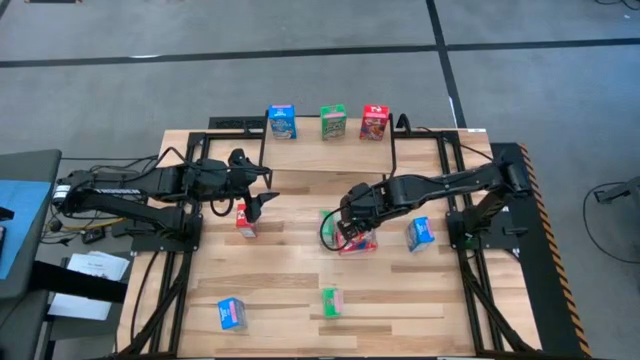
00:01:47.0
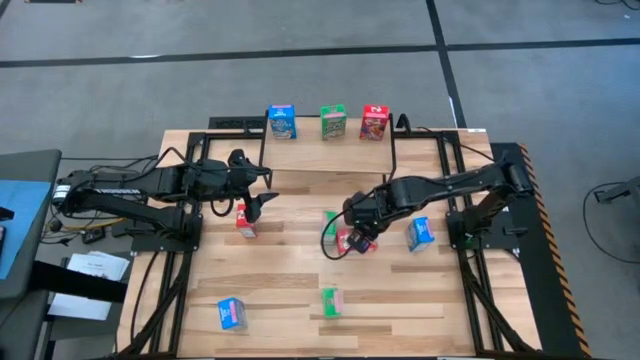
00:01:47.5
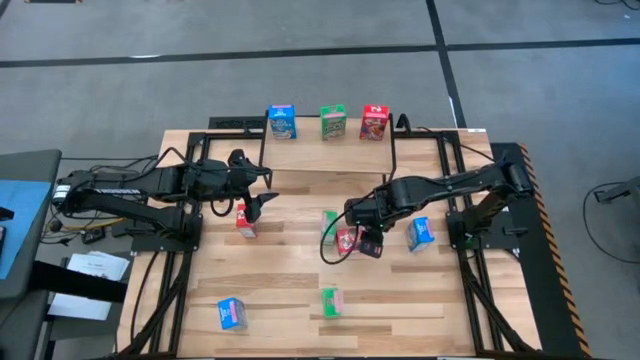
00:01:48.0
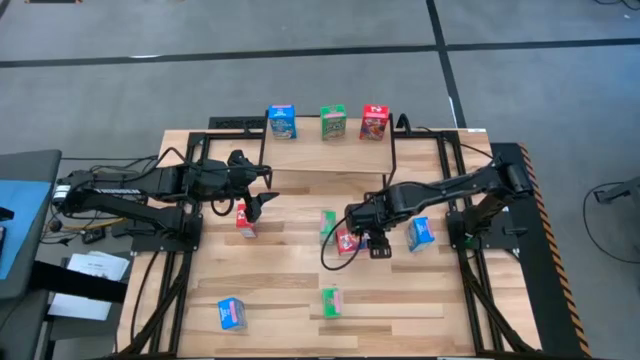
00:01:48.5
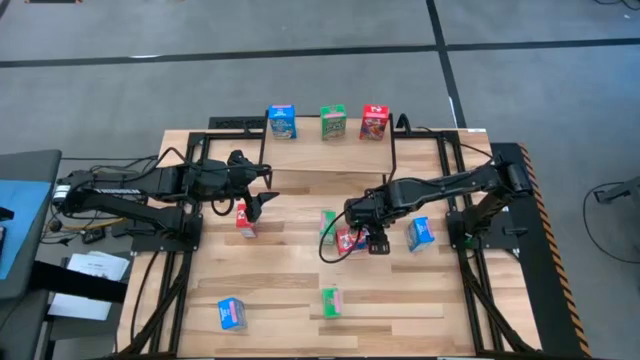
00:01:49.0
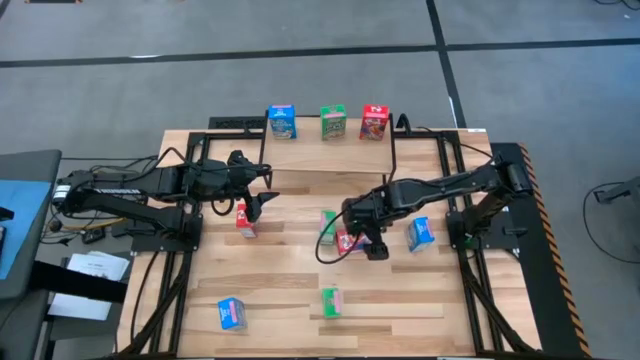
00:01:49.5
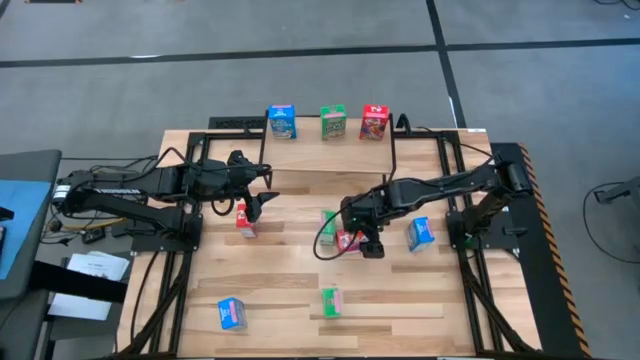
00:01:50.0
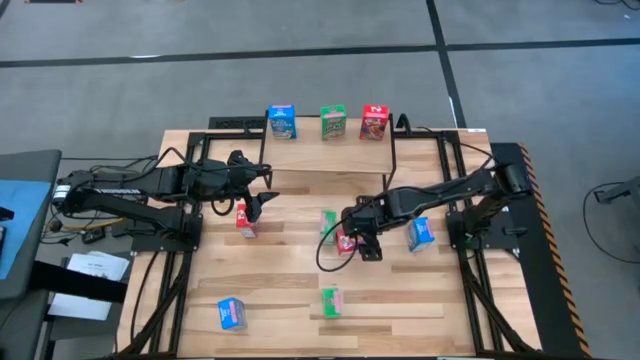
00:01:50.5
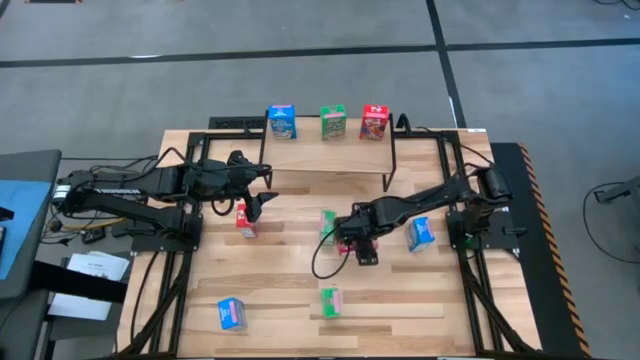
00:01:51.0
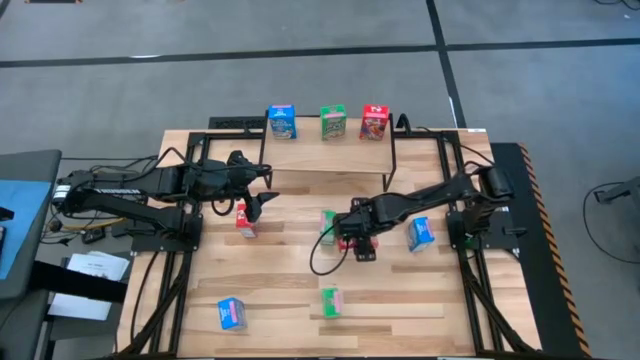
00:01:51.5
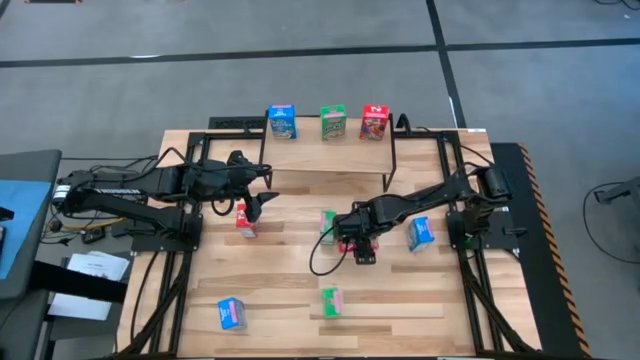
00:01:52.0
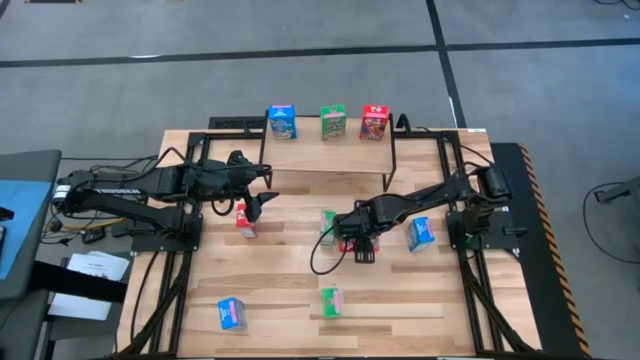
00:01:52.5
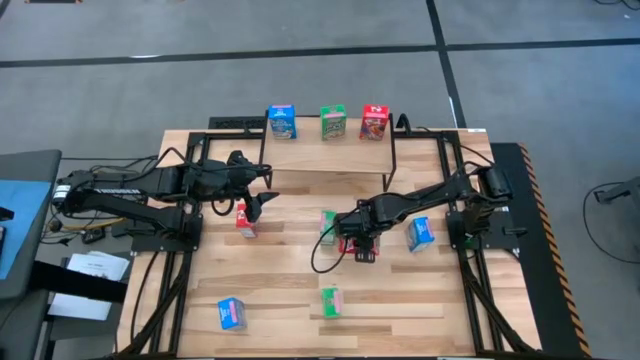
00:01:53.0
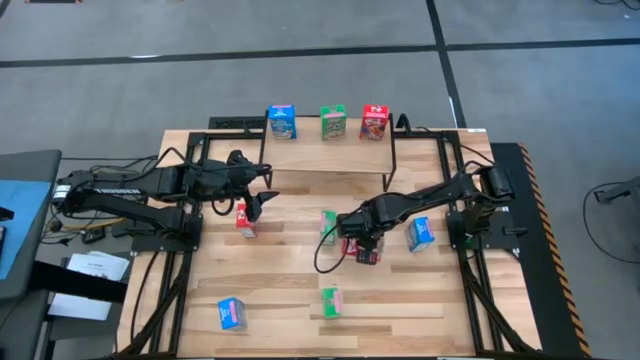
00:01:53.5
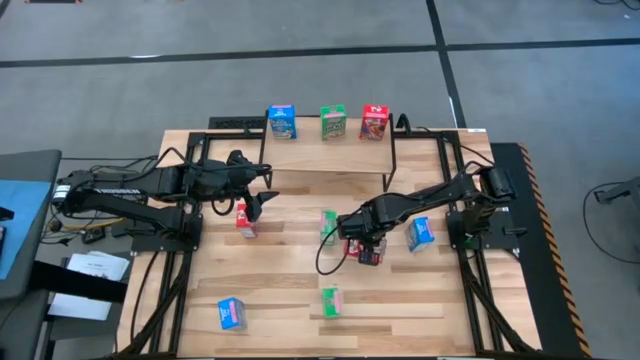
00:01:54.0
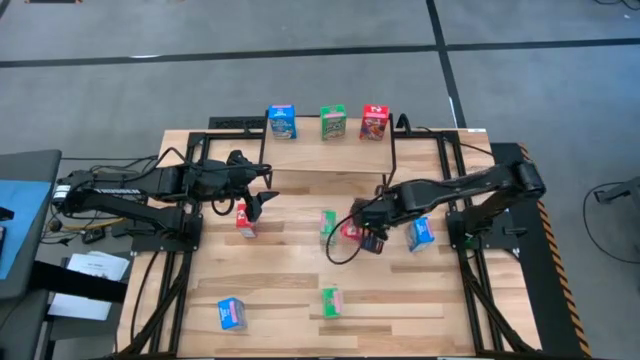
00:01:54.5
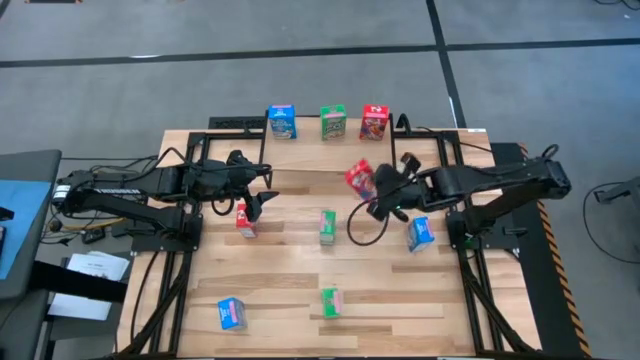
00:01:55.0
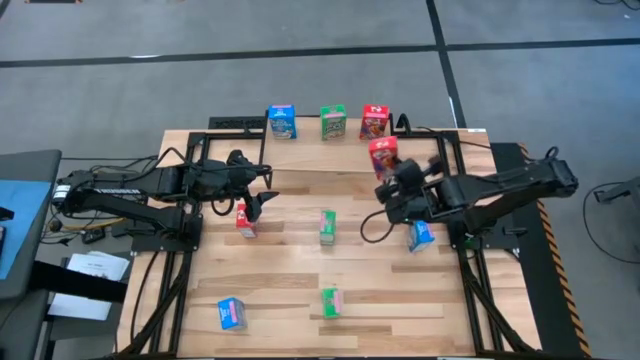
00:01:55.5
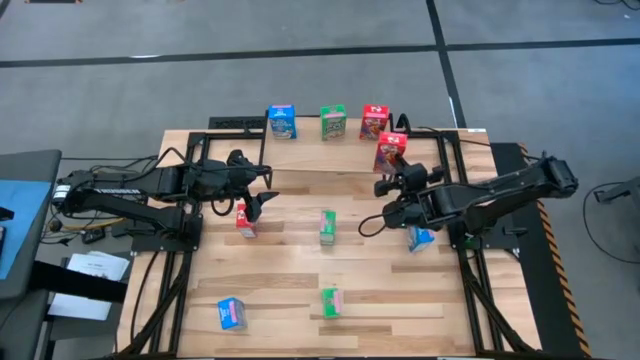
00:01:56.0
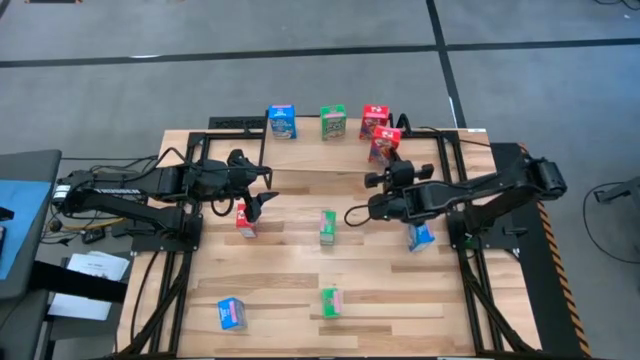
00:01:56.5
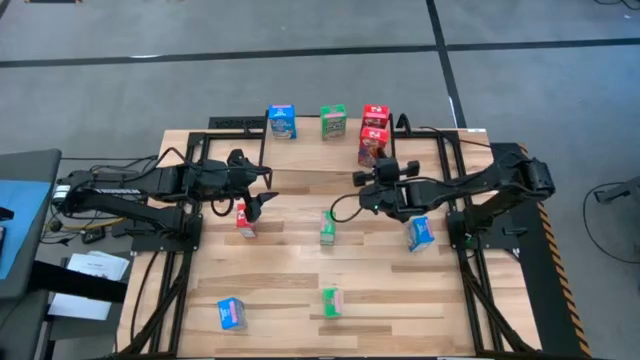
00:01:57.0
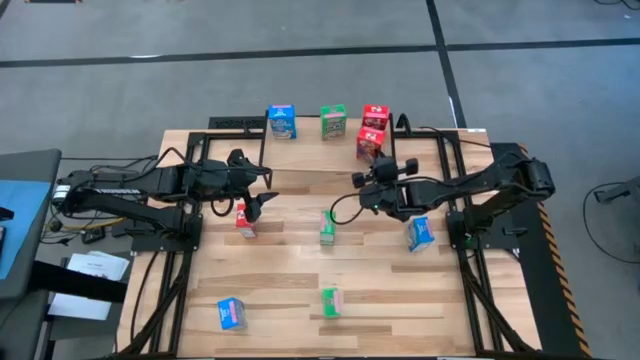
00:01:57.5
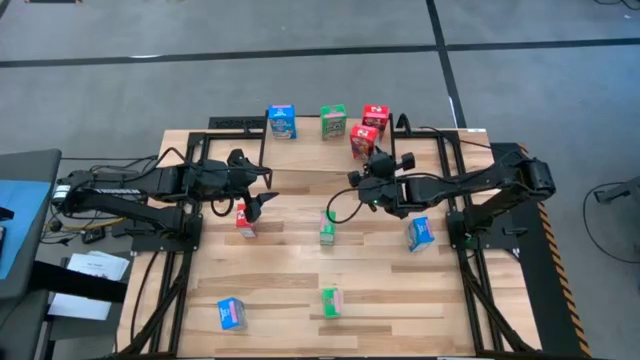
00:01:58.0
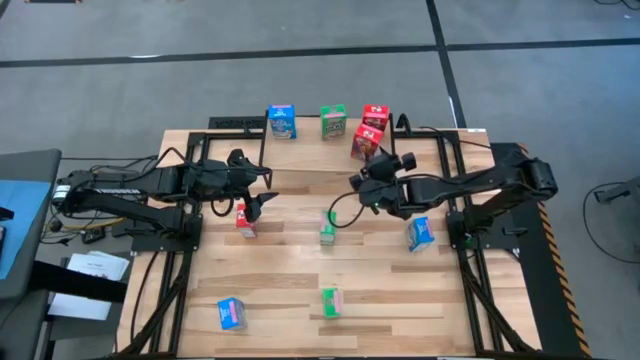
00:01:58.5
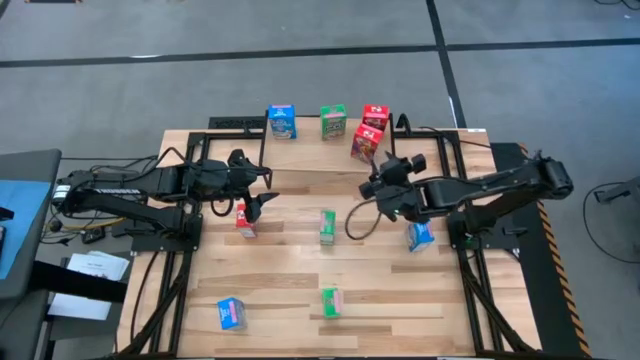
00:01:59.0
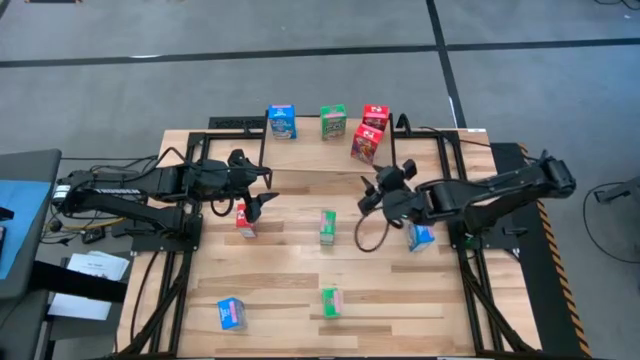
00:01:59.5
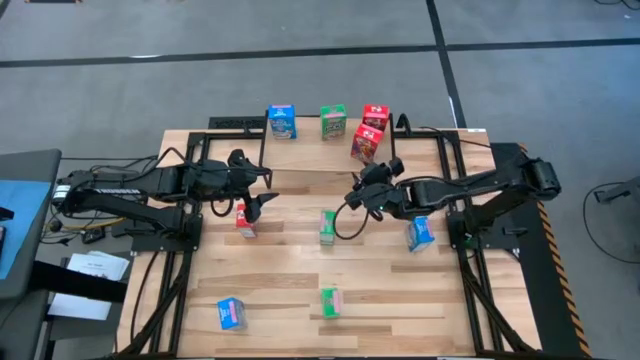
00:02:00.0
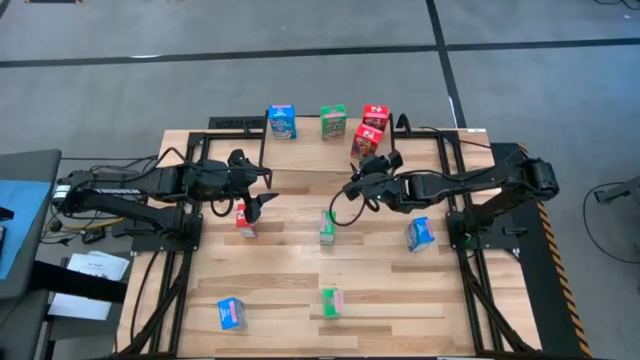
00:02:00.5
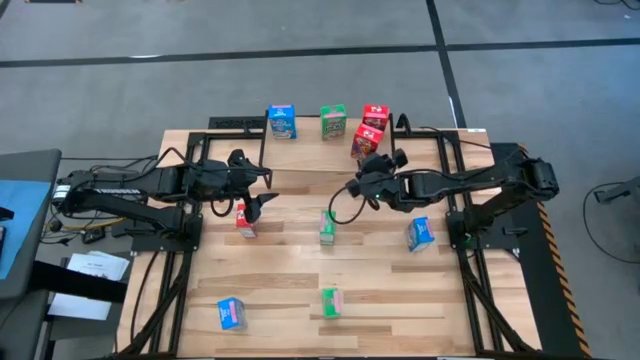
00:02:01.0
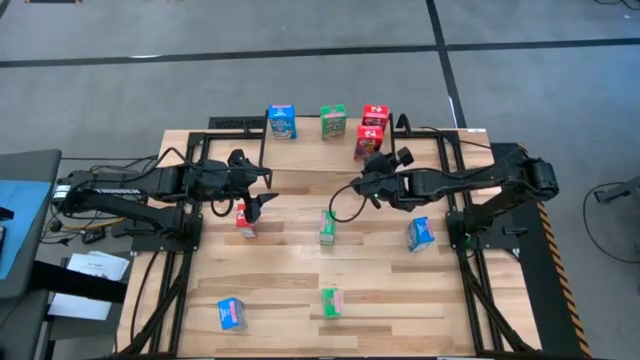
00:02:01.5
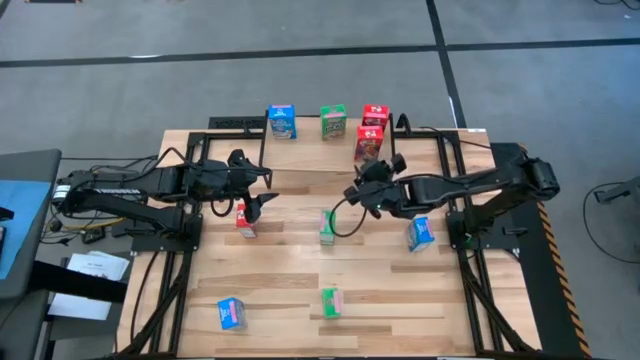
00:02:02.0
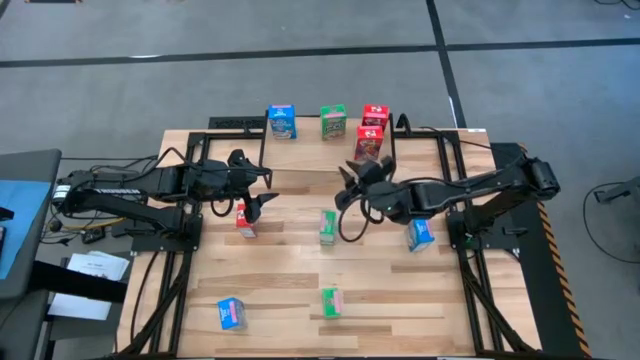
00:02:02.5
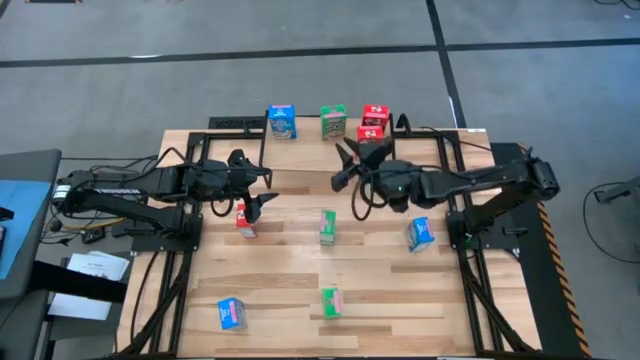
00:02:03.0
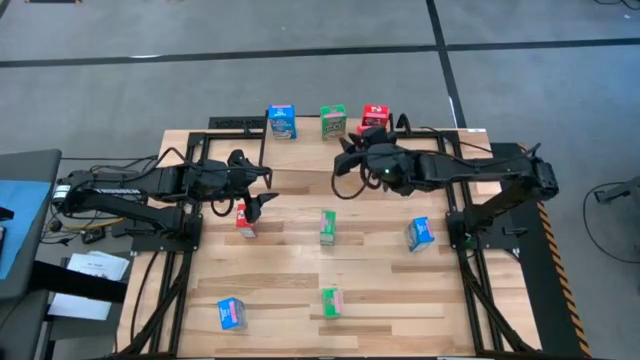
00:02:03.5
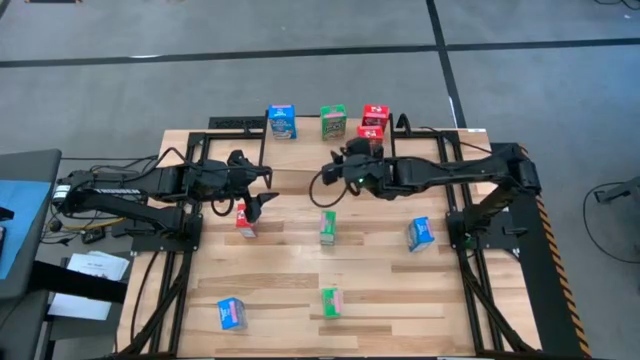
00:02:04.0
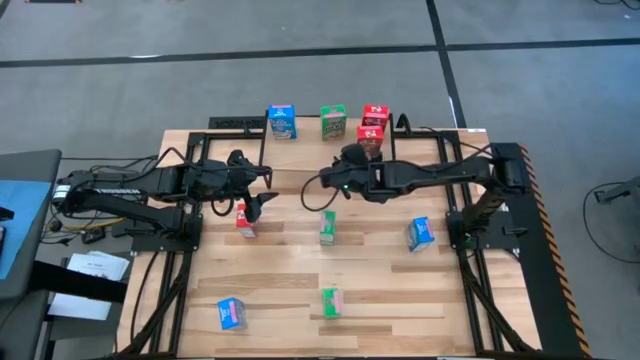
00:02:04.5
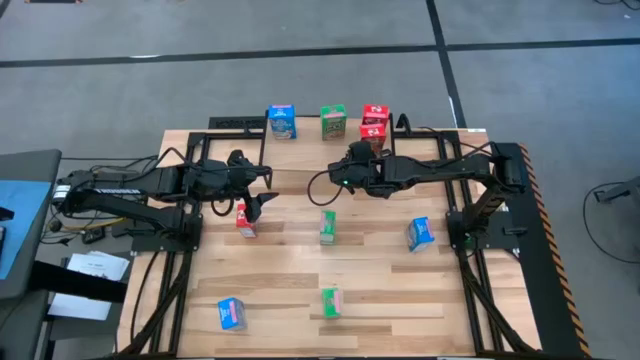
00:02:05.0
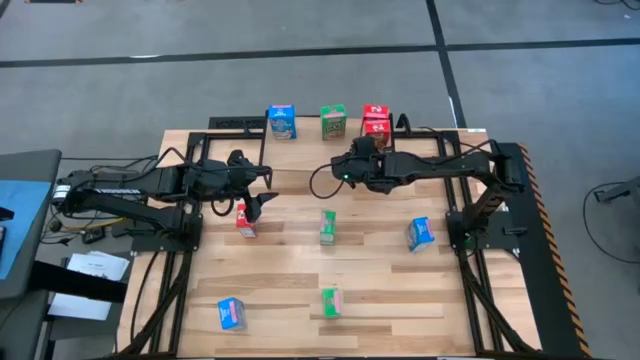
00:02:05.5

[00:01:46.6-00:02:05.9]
Task: Stack cereal on shelf
Put the right red cereal box on the shelf aligned with the other red cereal box

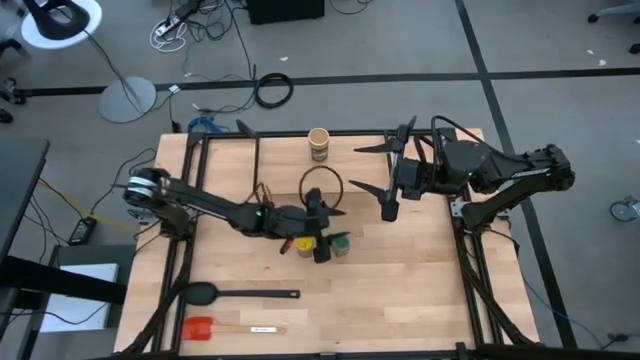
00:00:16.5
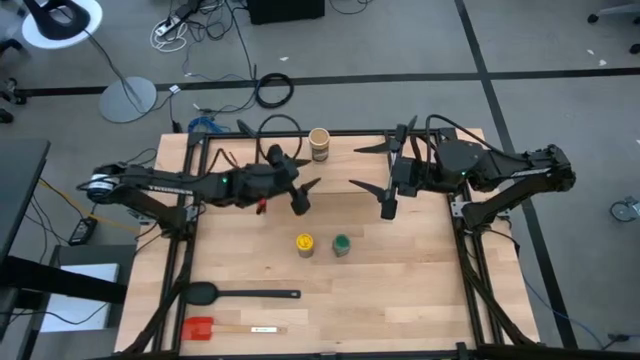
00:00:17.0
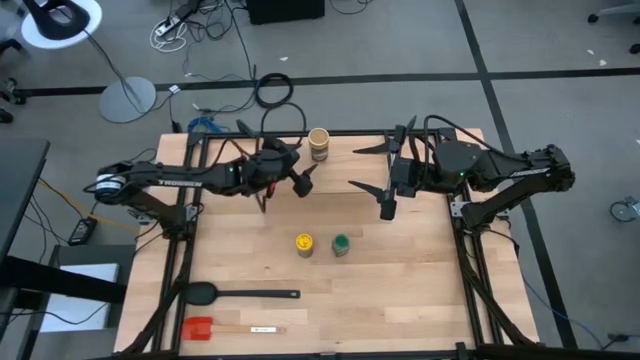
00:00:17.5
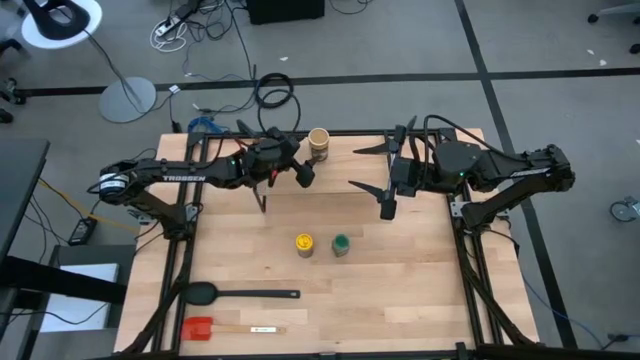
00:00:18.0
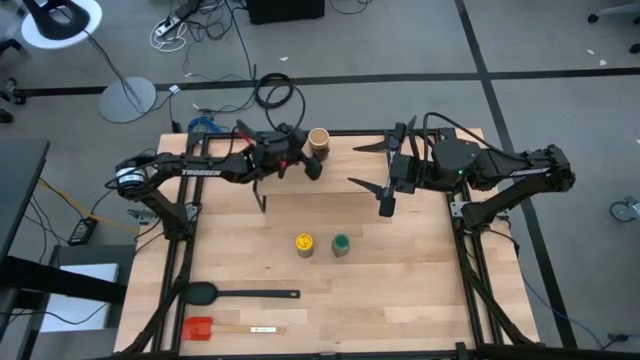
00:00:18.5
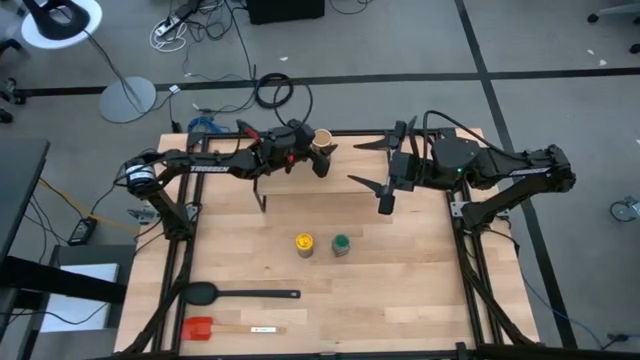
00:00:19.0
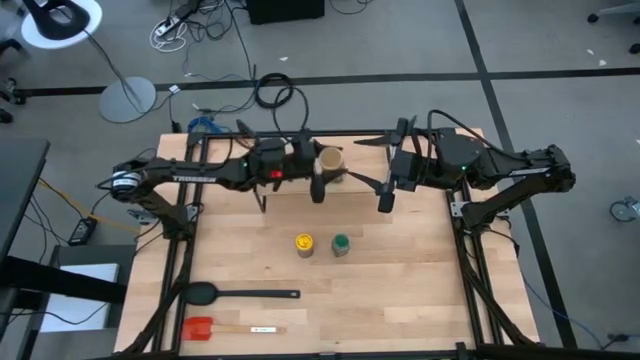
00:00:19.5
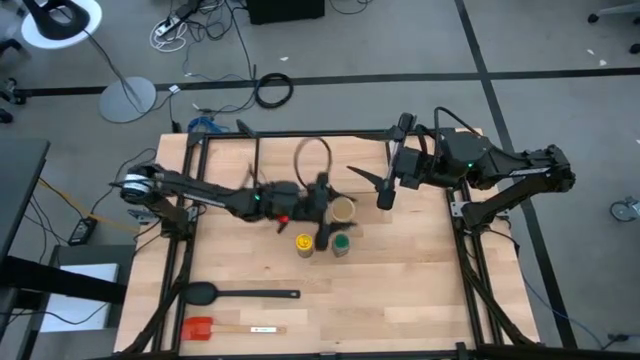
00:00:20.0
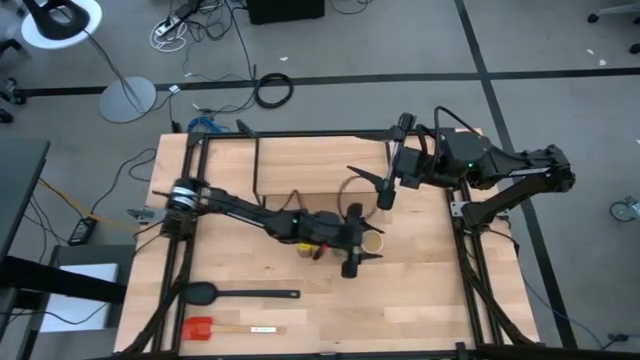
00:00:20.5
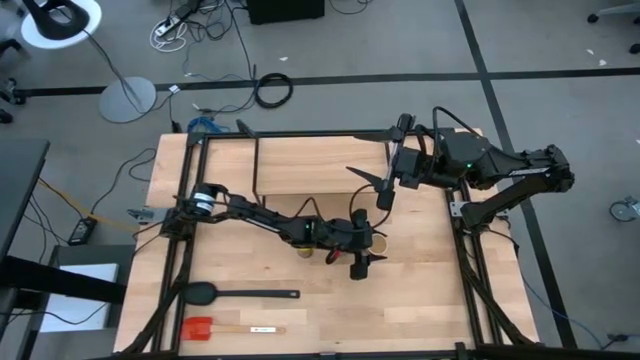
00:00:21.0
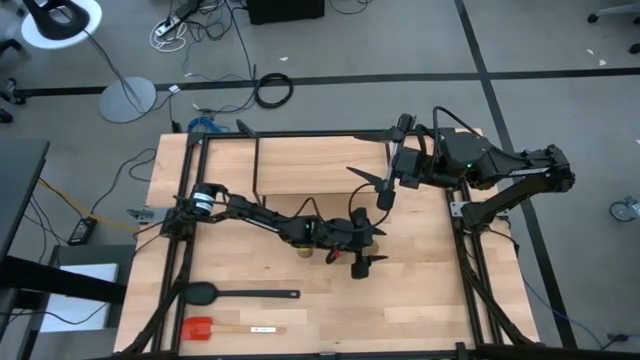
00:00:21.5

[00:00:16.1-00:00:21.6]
Task: Shelf spices
Remove the golden seasoning bottle from the shelf
